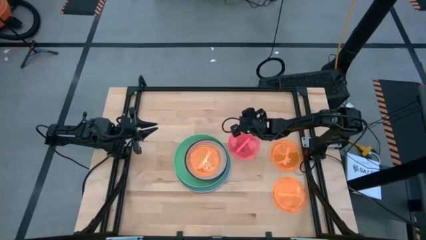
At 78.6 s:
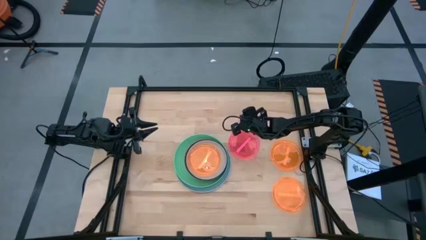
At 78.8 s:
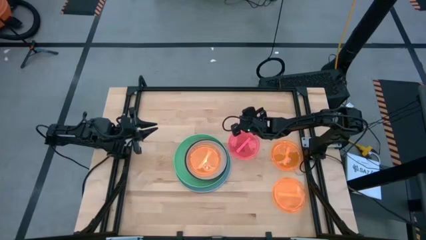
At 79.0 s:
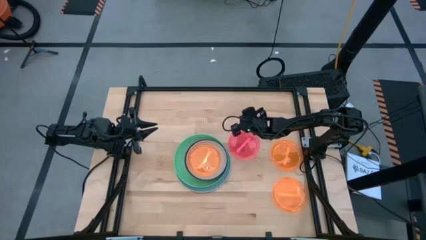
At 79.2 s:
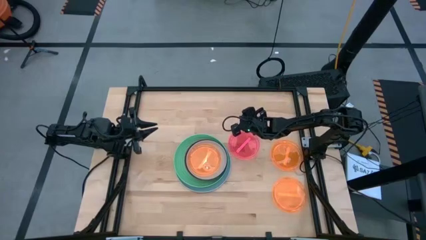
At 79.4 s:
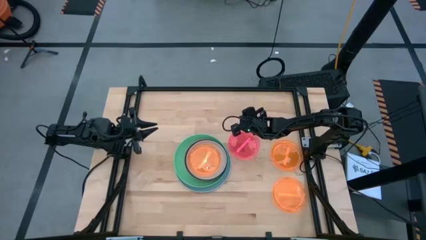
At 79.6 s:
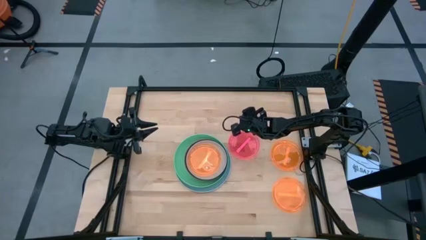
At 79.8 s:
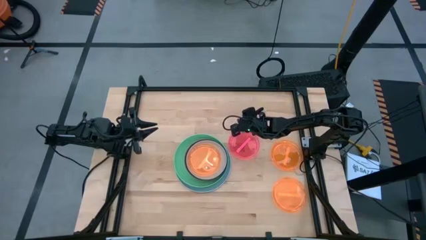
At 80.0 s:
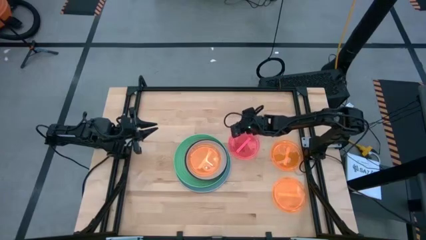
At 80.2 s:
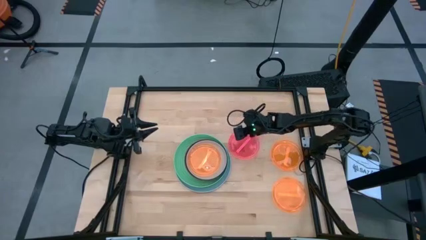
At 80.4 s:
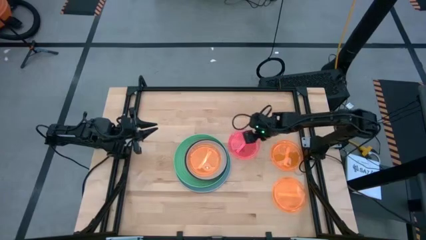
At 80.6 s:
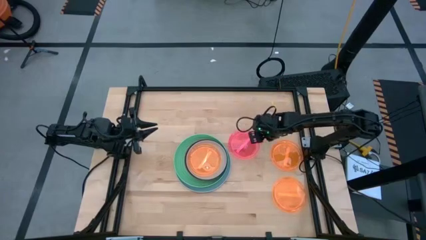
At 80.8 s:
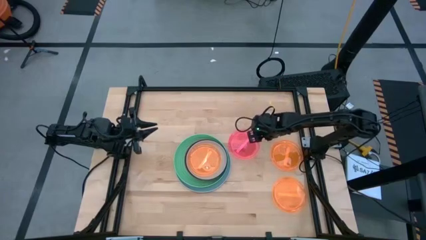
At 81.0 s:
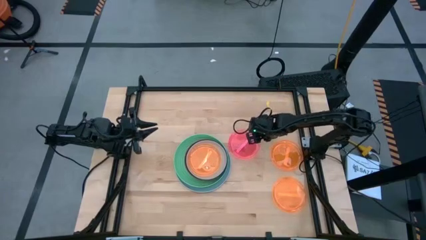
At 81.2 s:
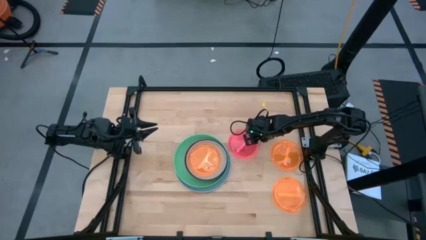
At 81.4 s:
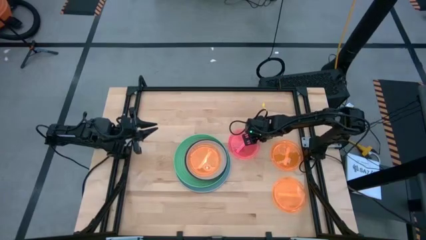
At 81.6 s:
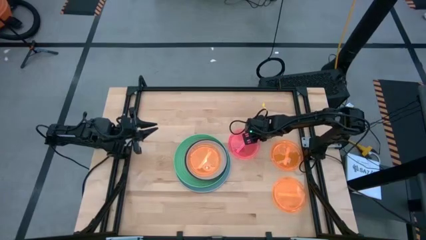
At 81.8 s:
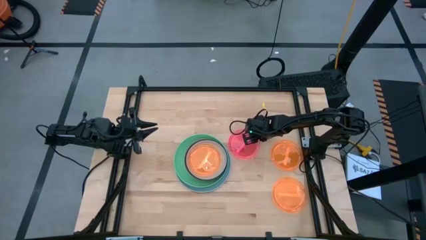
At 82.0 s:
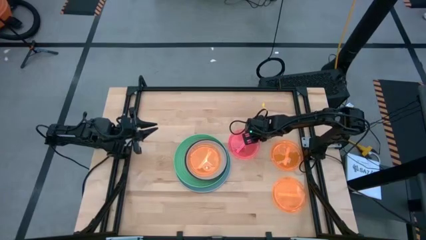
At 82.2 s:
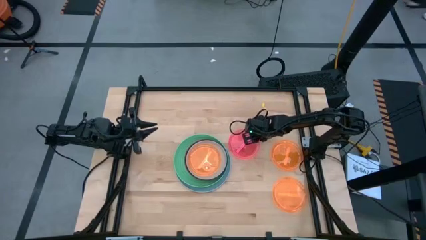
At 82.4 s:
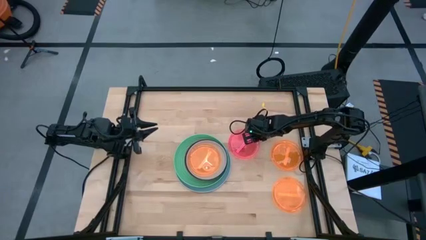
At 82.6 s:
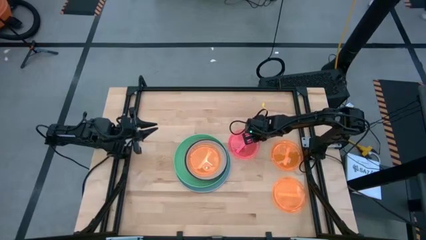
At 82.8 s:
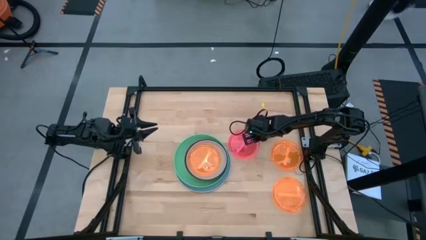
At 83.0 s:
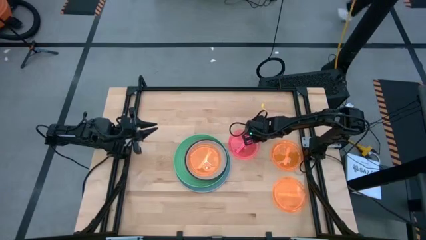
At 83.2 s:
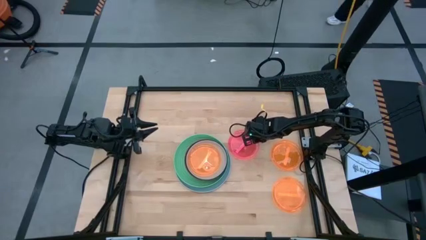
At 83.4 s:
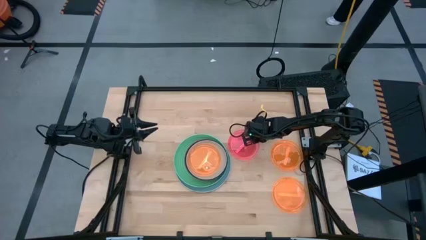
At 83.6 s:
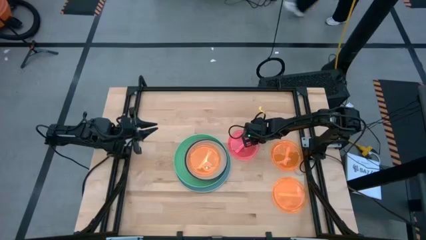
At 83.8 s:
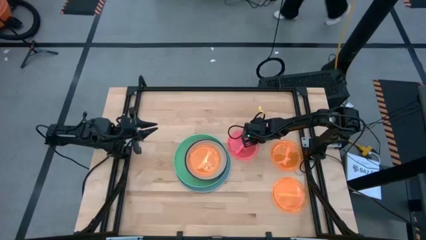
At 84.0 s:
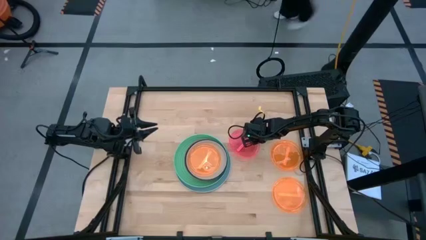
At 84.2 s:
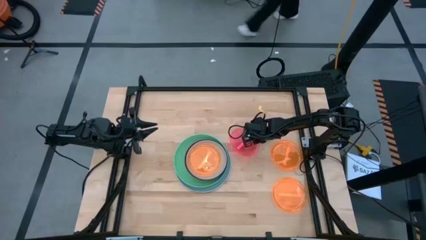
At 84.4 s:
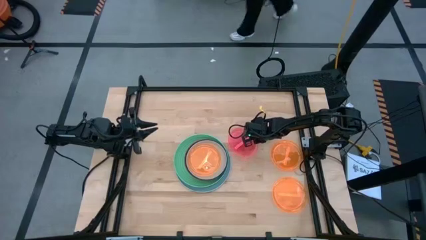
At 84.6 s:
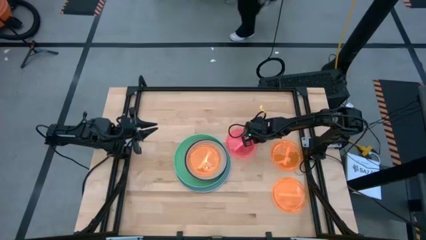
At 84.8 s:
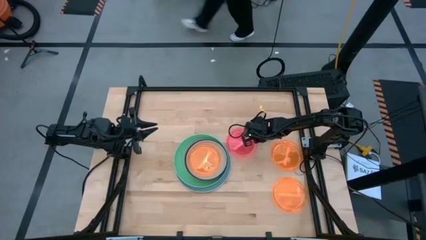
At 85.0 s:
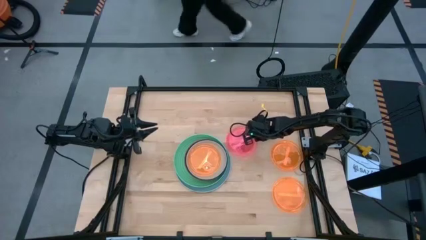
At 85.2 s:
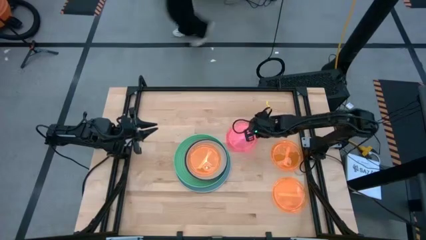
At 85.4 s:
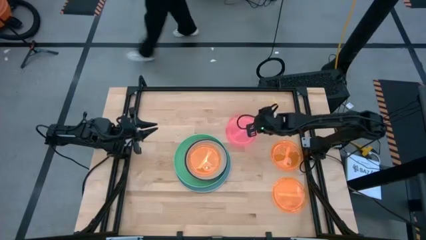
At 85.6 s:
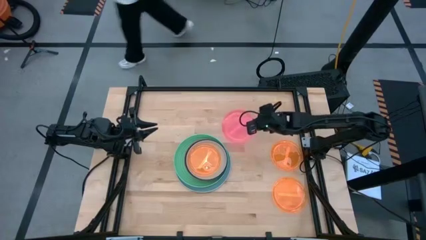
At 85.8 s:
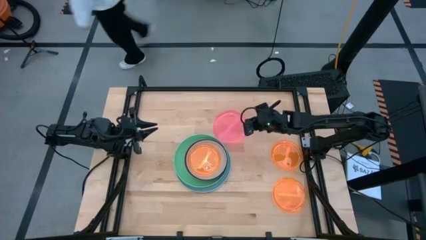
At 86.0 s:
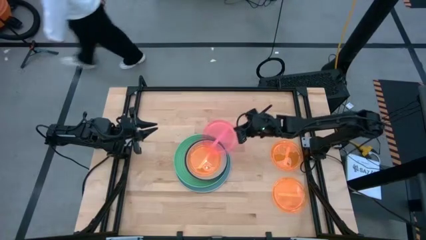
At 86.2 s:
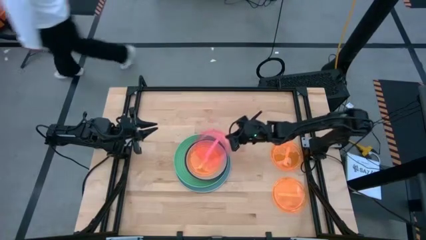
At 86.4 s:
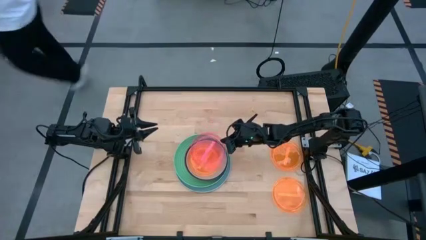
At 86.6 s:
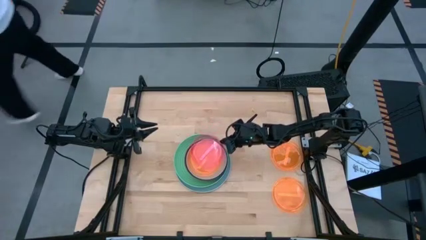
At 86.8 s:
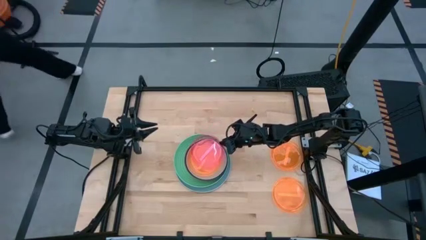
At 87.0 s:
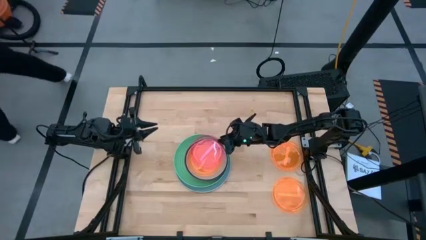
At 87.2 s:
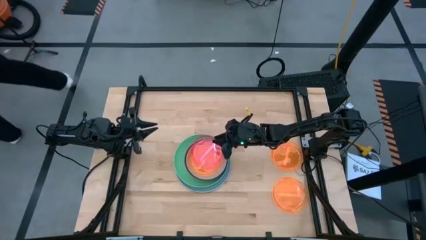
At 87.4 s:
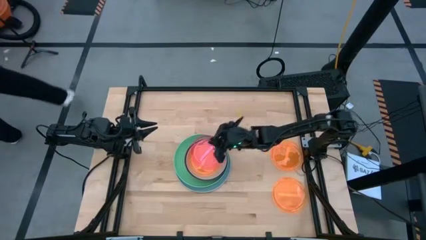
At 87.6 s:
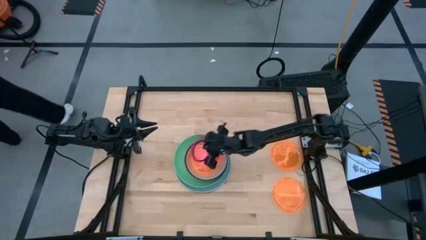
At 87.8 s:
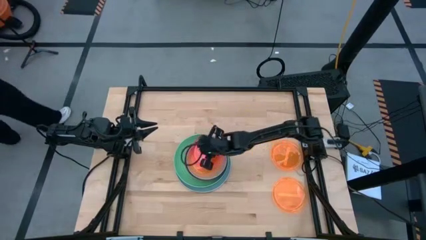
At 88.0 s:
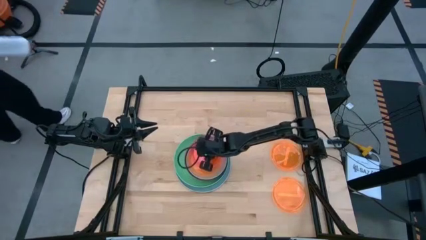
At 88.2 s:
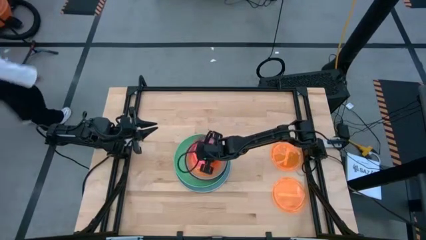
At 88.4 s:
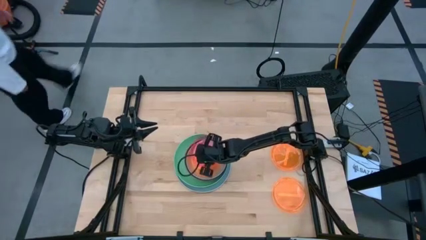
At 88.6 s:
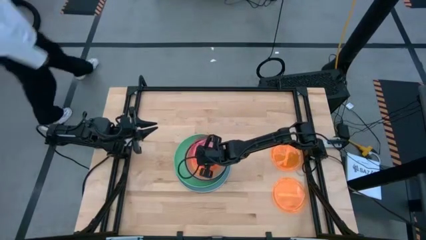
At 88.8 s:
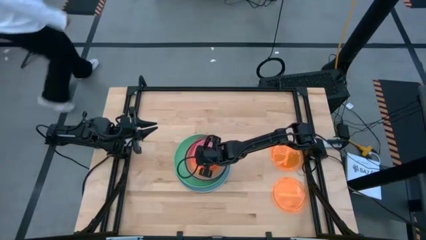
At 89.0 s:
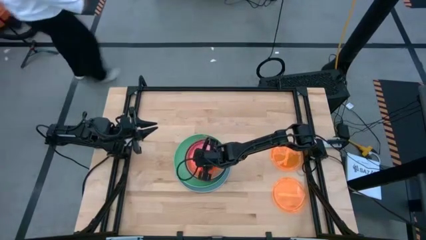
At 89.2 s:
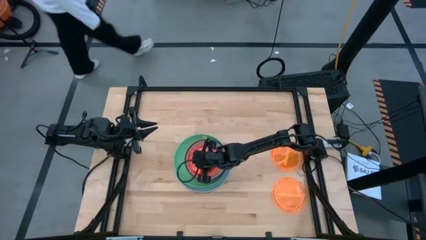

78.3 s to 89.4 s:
Task: Stack plastic plates
Stack the transparent pink plate on top of the transparent orange plate

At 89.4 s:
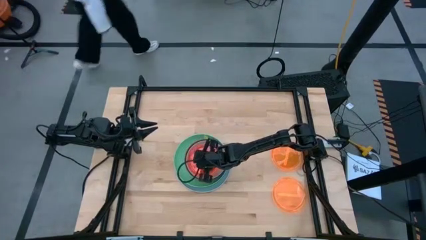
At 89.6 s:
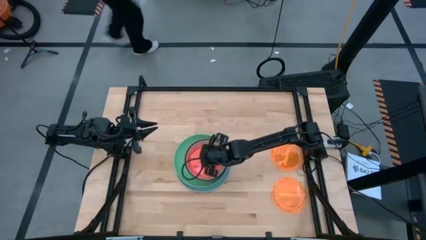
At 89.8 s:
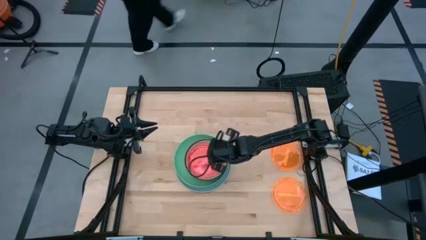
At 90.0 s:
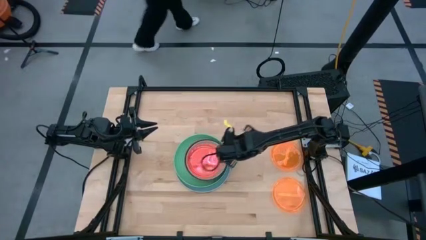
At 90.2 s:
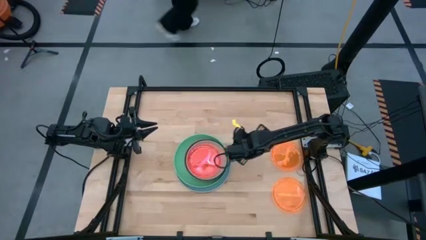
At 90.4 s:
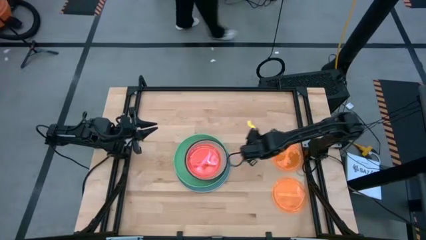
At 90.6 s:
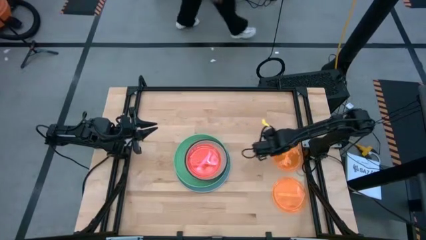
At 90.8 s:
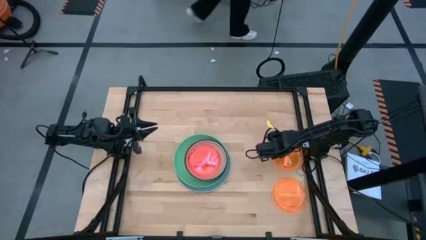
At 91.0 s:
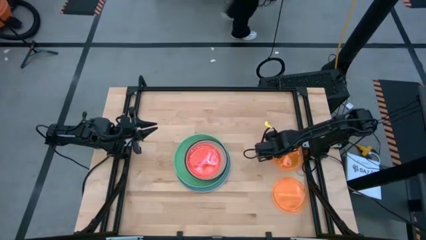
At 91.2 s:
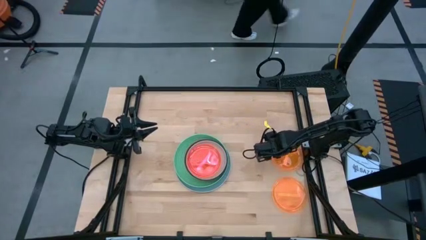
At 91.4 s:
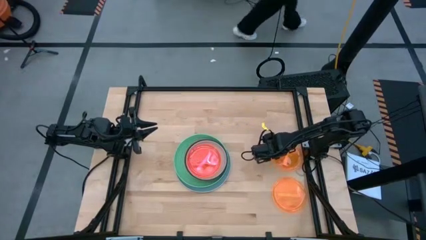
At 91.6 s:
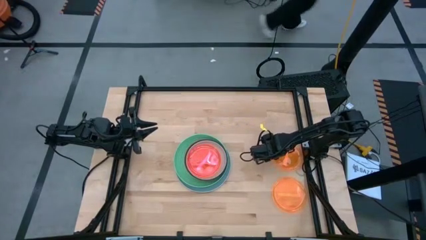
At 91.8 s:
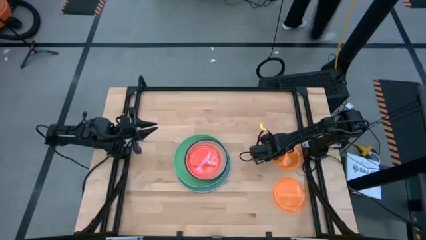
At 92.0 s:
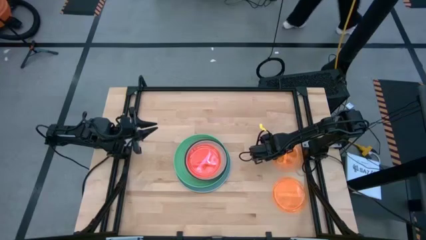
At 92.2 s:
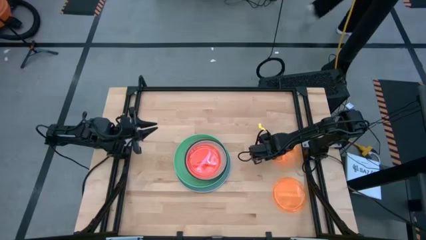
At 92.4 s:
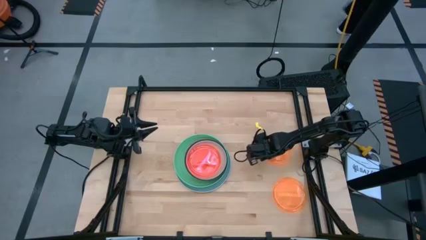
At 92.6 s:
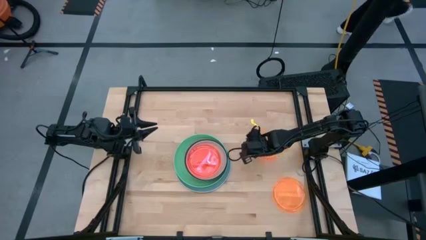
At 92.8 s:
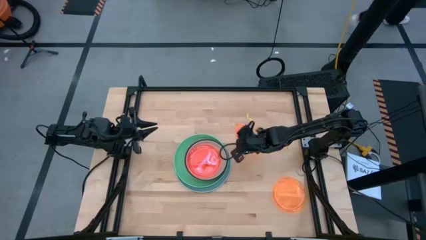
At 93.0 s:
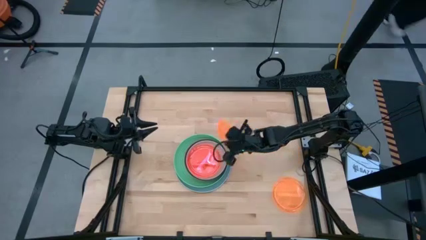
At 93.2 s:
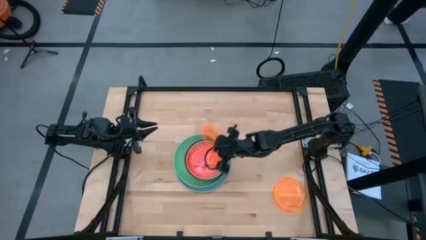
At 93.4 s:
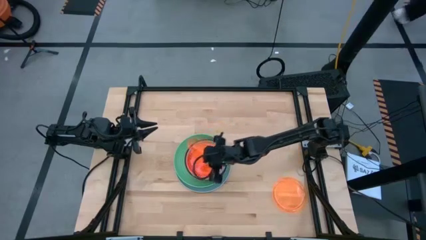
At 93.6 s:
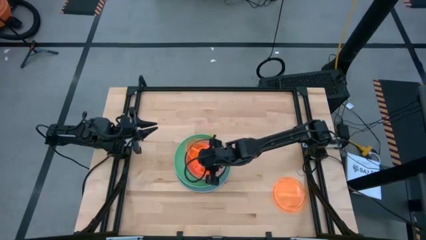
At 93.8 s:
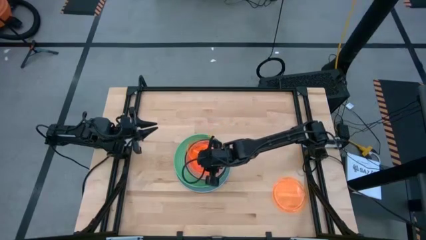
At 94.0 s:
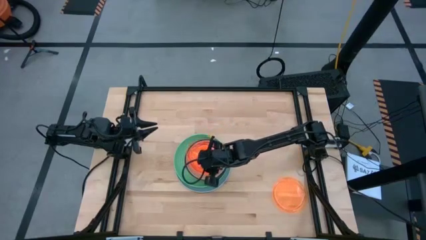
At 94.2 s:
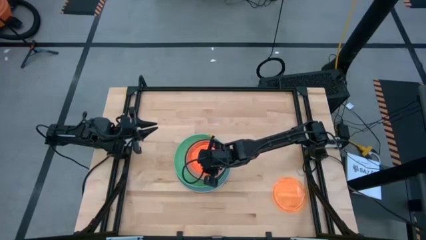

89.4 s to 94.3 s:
Stack the top transparent orange plate on top of the transparent pink plate
